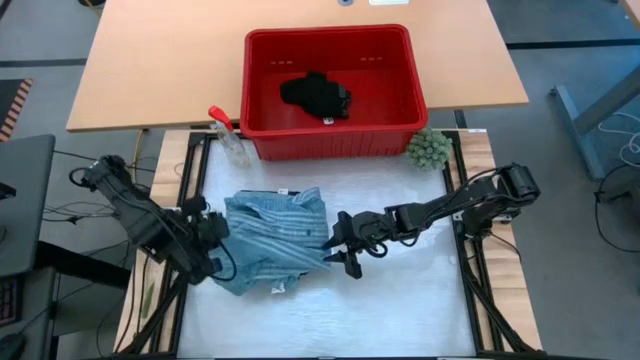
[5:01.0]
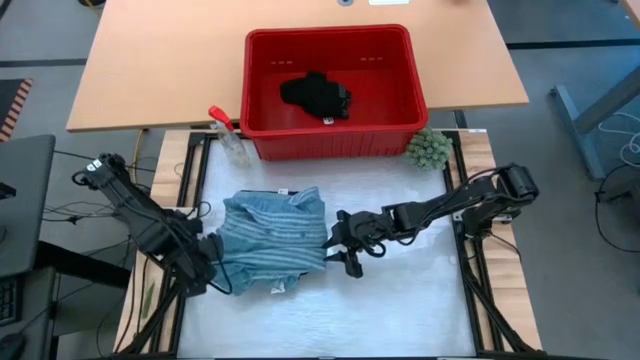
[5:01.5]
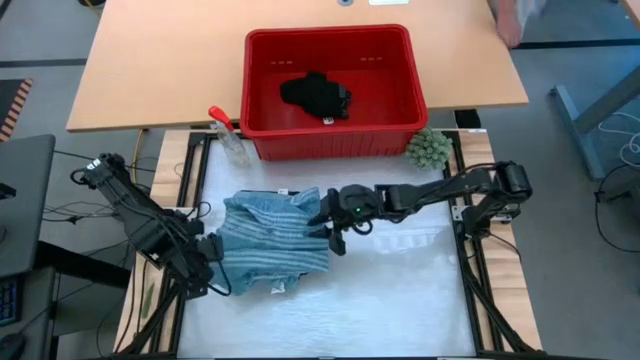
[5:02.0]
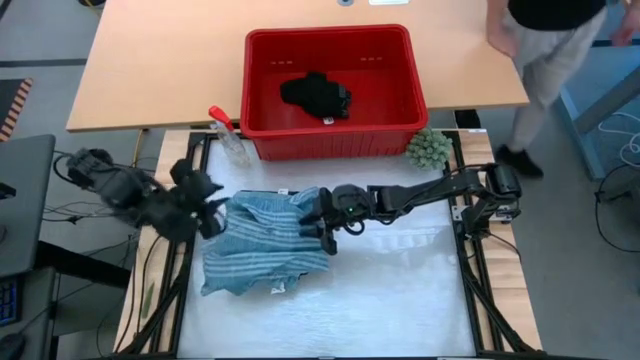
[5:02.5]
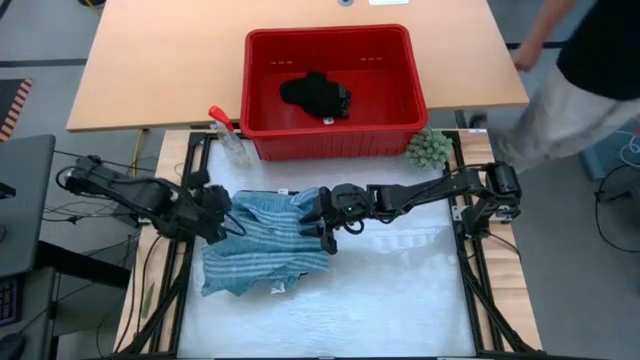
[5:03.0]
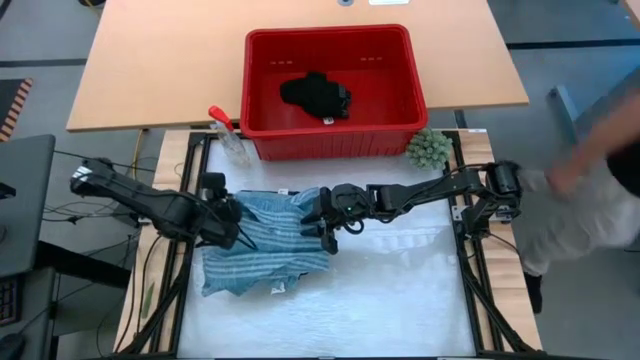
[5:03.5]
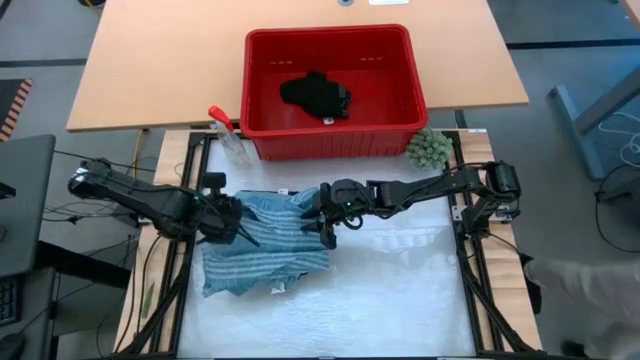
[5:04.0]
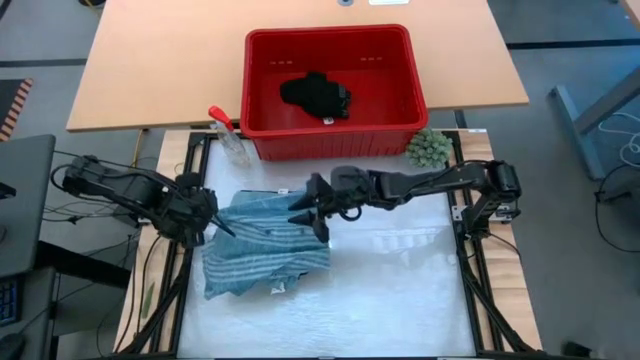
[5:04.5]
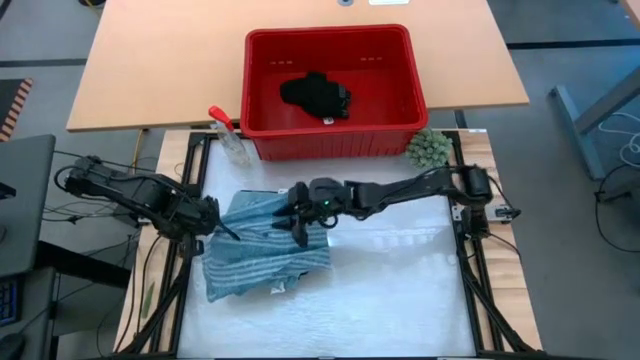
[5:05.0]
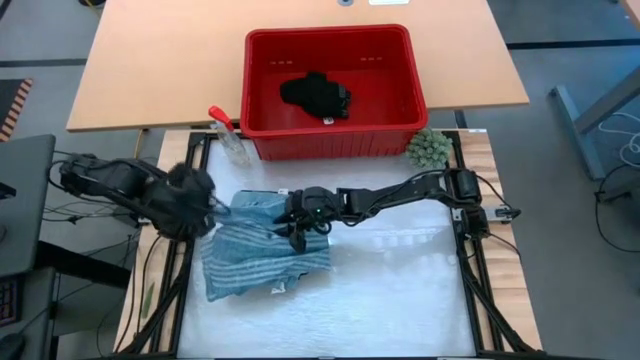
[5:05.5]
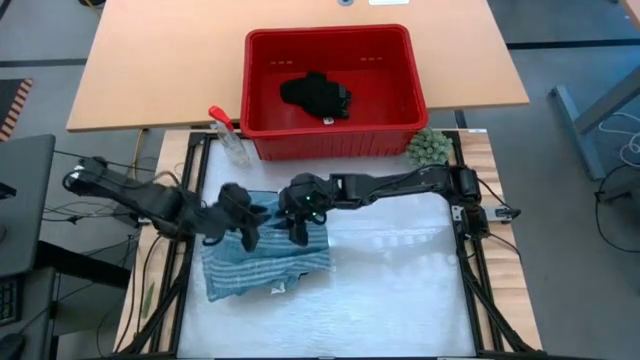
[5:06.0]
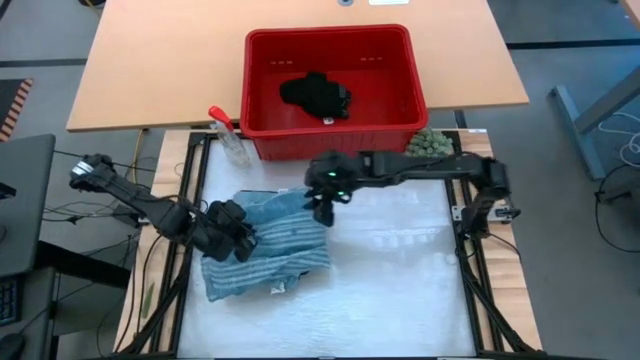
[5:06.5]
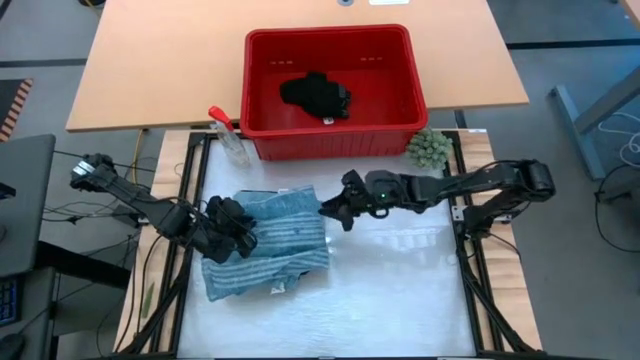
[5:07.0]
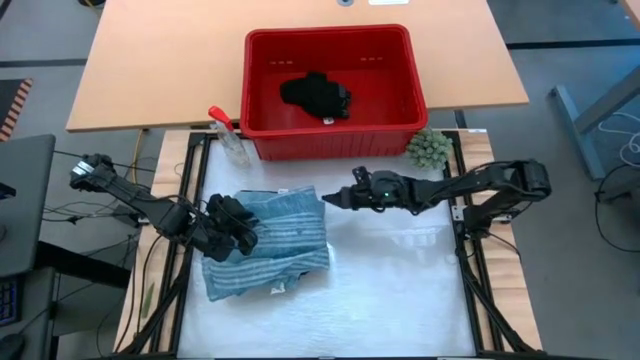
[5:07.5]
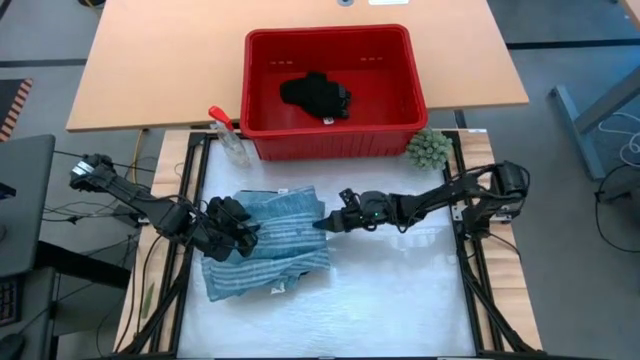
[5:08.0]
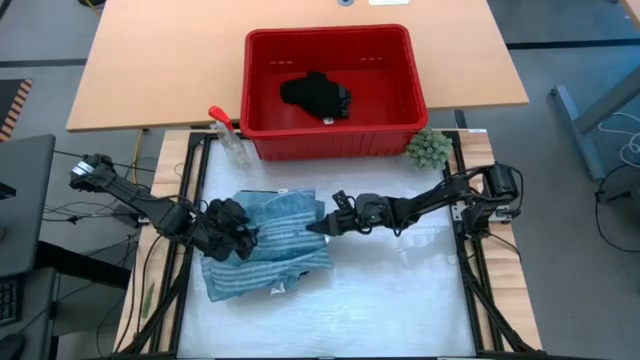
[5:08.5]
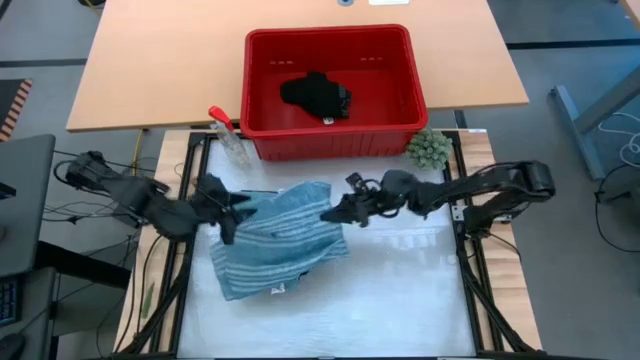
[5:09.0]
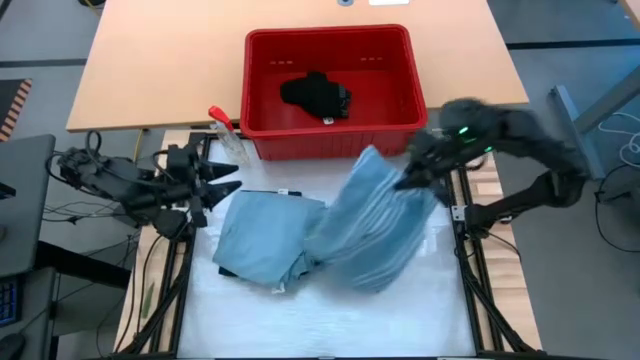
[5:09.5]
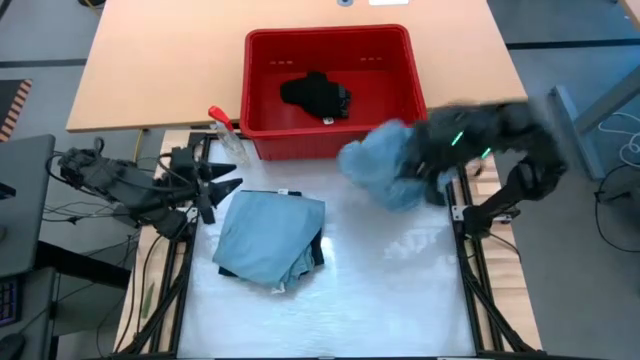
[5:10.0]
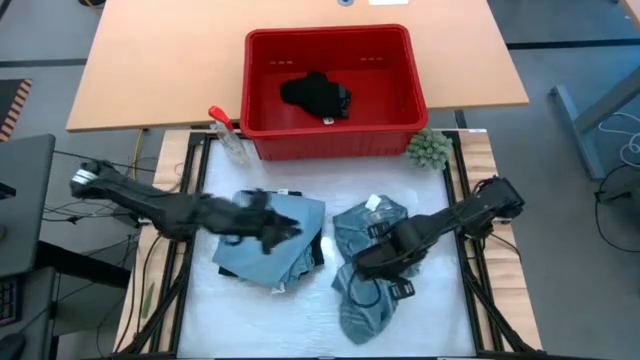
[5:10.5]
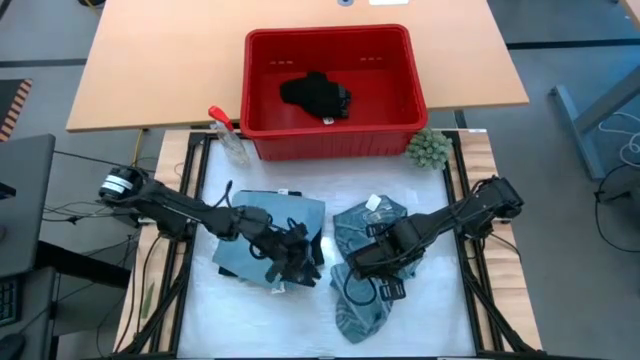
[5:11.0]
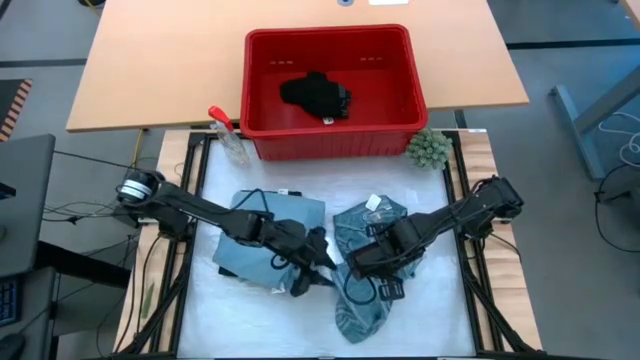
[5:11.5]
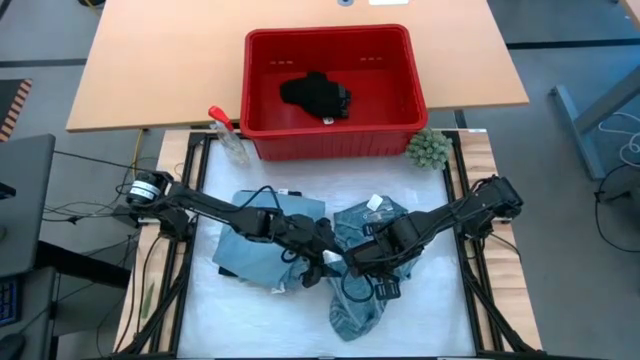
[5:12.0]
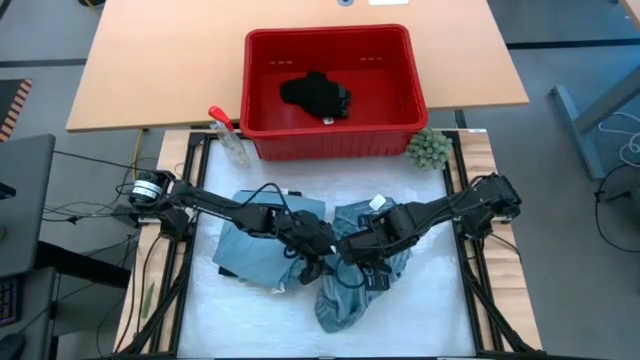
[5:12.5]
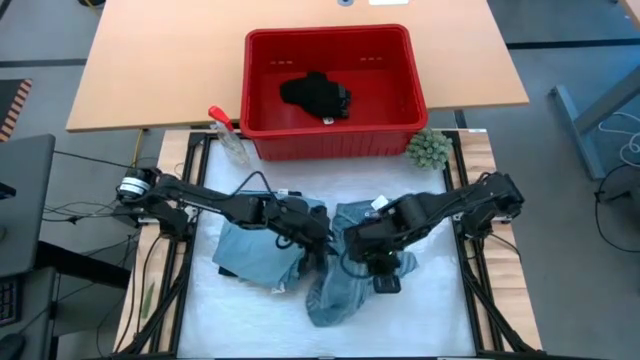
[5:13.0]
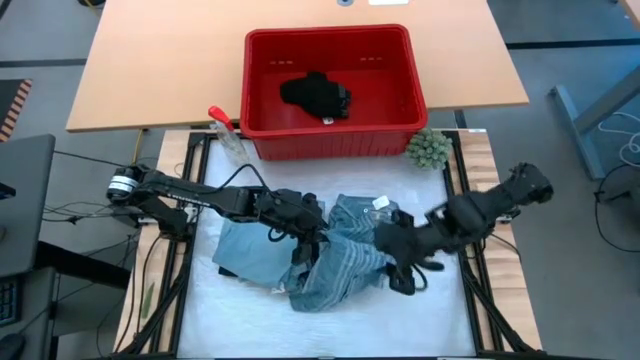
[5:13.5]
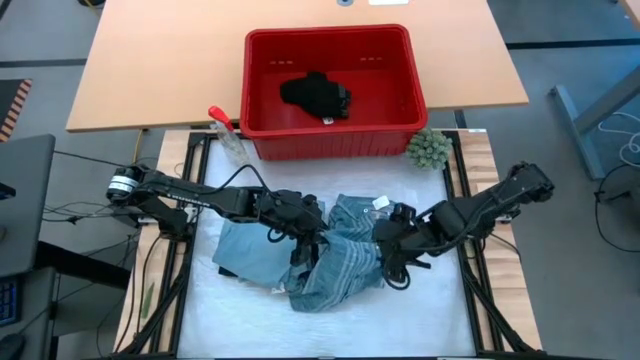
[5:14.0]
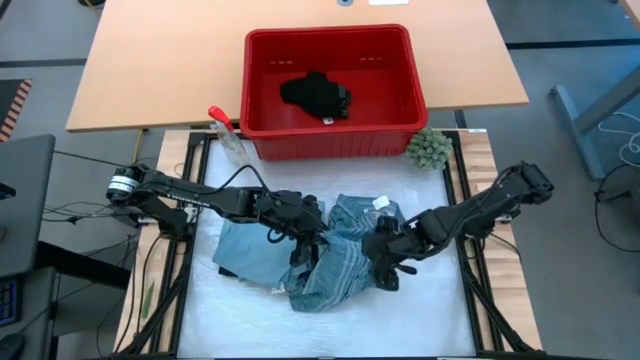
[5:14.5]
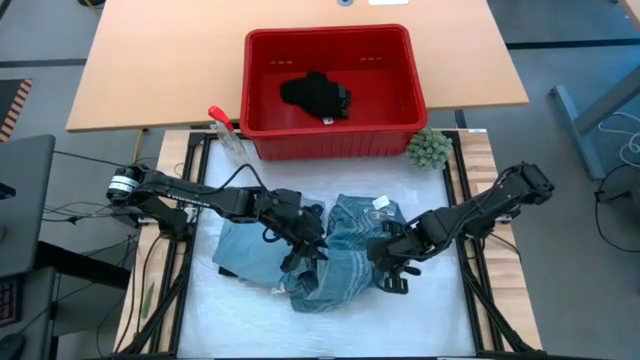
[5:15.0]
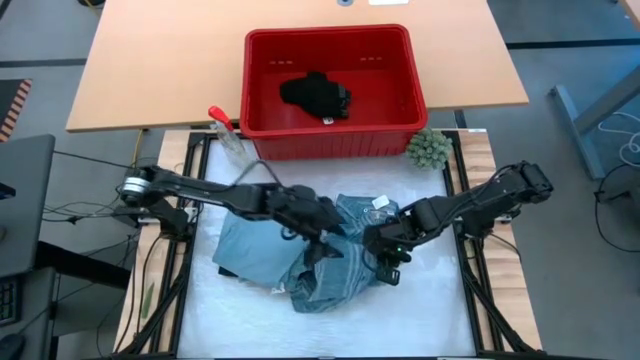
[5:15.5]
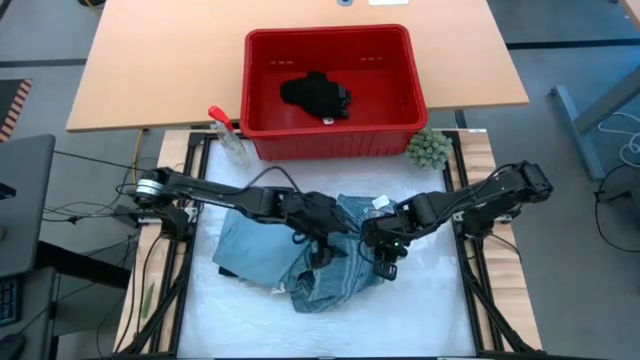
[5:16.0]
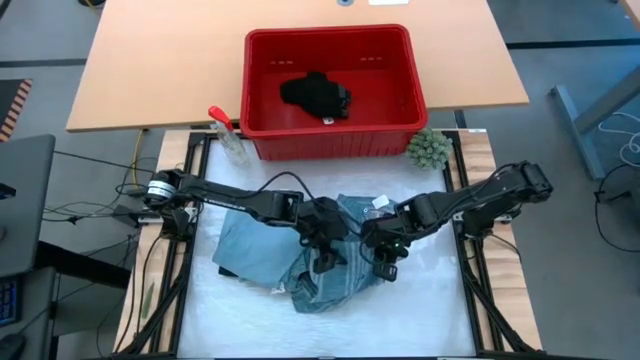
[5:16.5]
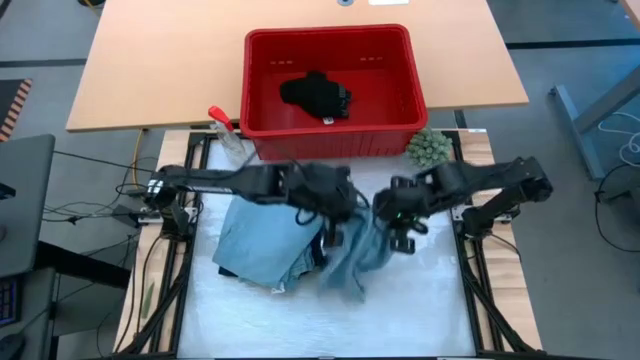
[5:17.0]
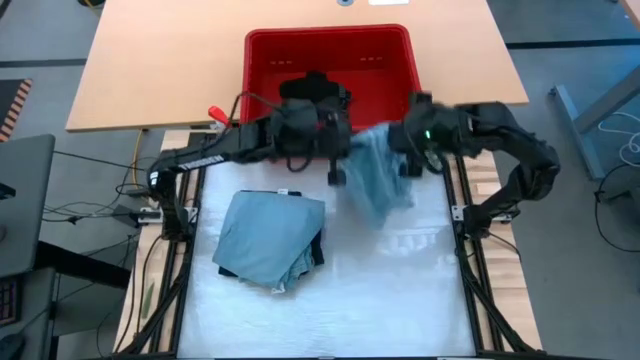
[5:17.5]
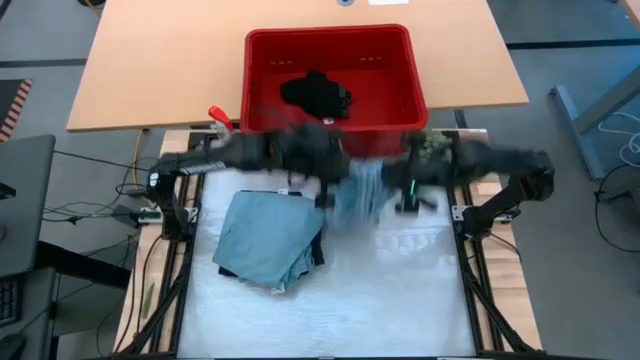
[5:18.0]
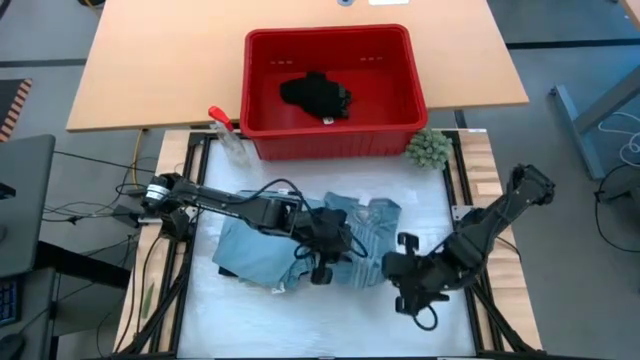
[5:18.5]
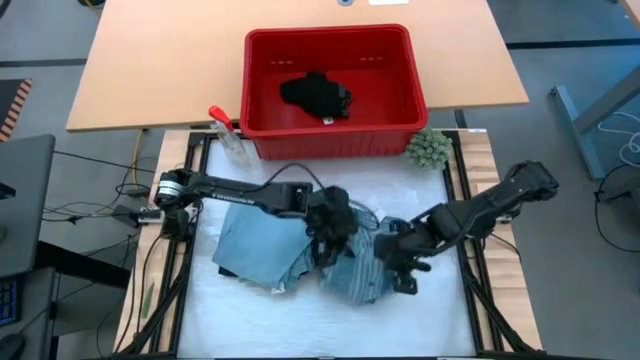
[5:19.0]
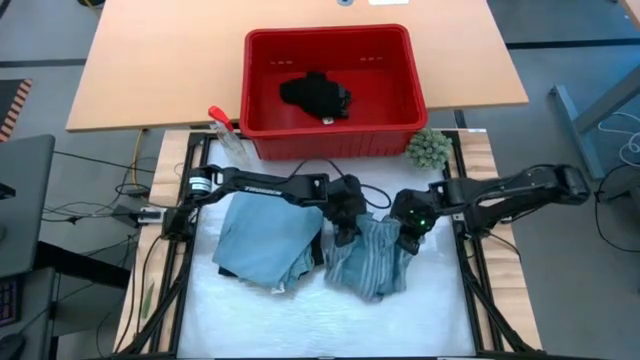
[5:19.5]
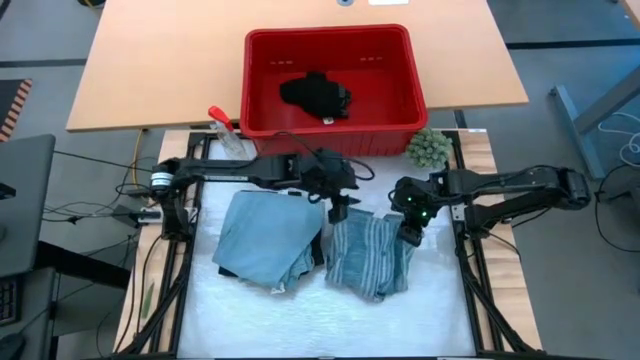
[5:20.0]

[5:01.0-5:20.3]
Task: Fold Laundry from Bin
Fold the light blue polo shirt

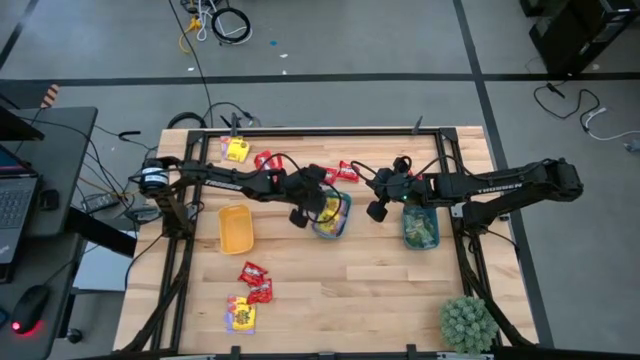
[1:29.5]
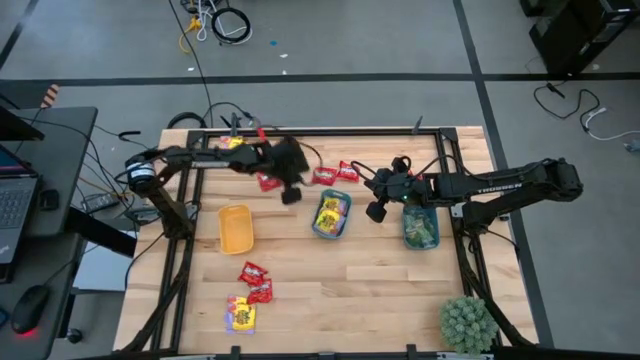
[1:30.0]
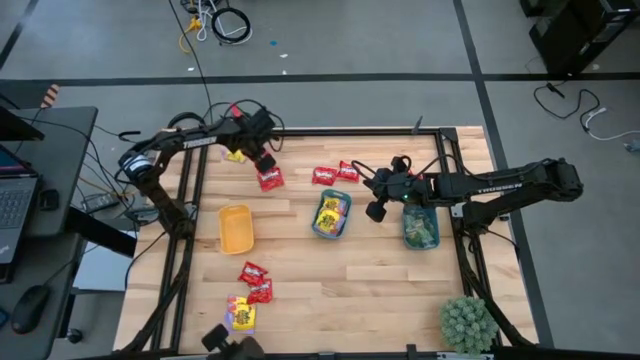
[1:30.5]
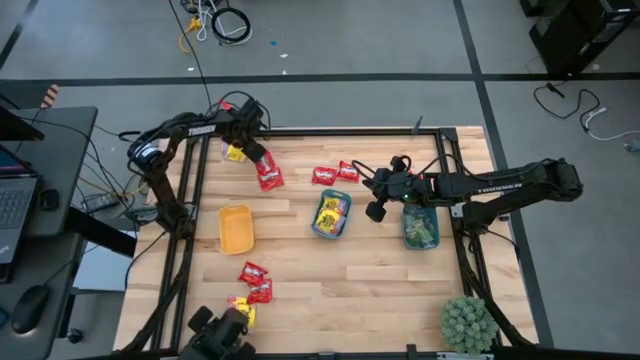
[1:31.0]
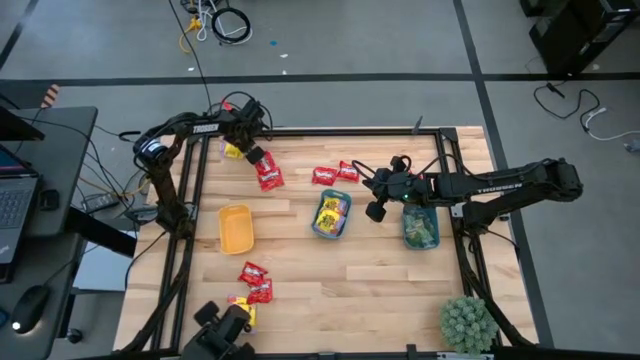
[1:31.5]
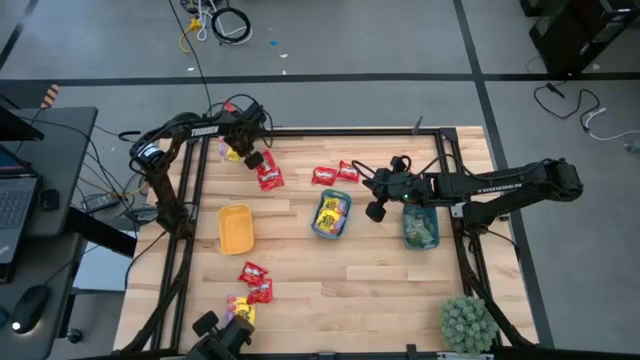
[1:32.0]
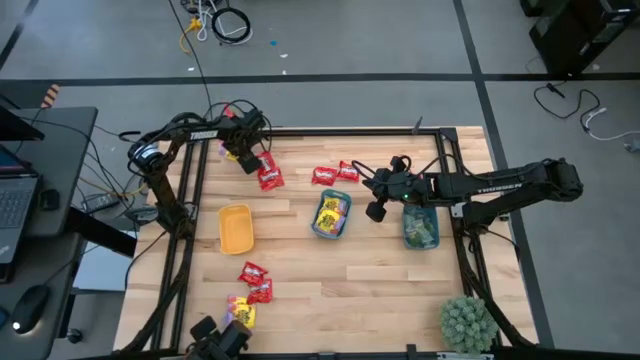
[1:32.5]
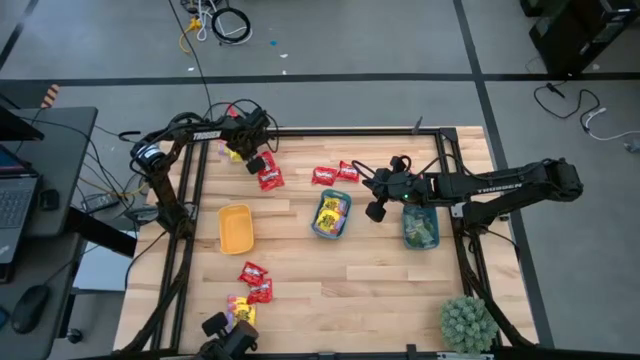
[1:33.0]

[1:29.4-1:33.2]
Task: Sort candy
Put the yellow candy pack into the green bin
